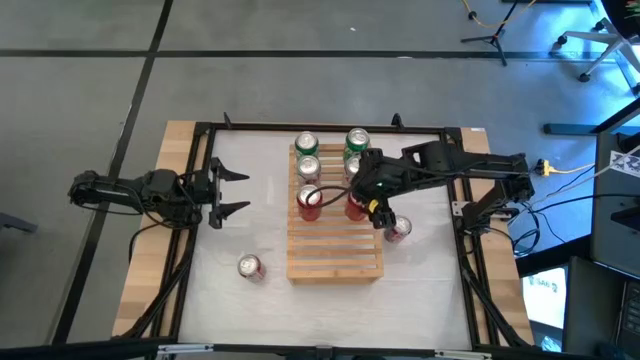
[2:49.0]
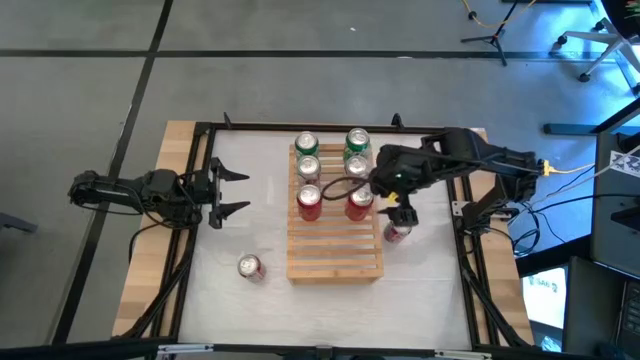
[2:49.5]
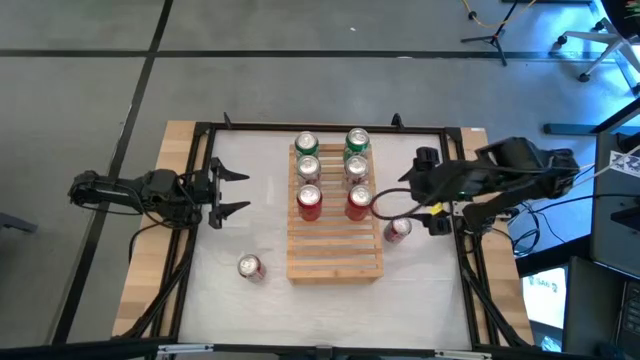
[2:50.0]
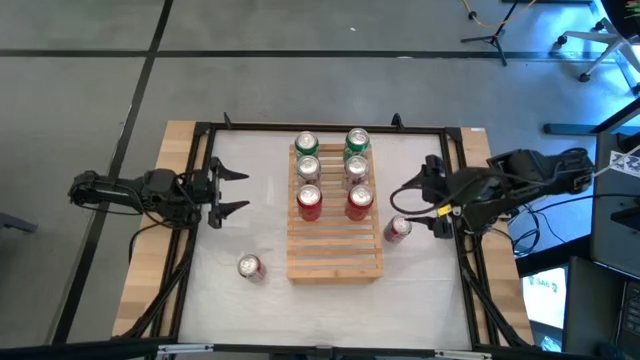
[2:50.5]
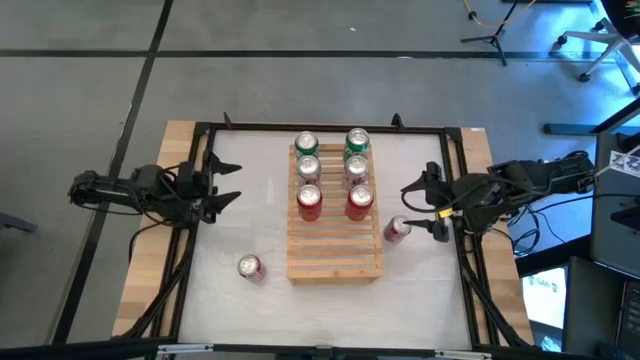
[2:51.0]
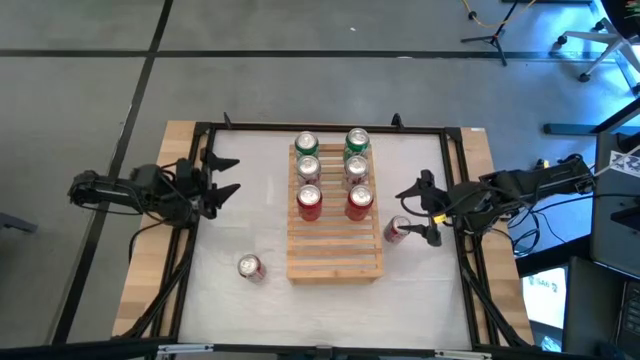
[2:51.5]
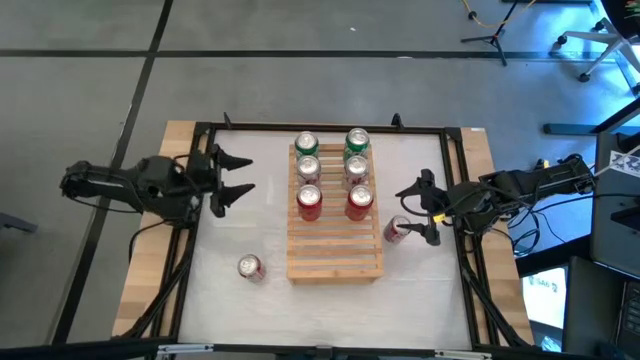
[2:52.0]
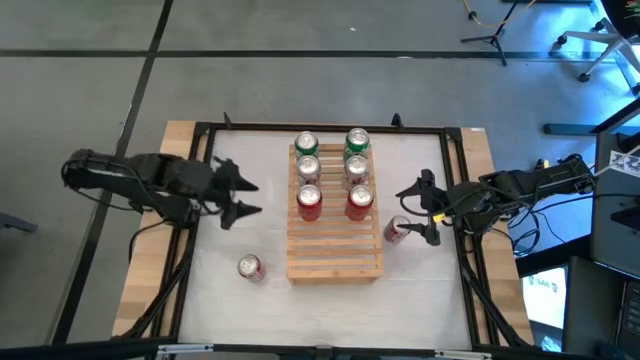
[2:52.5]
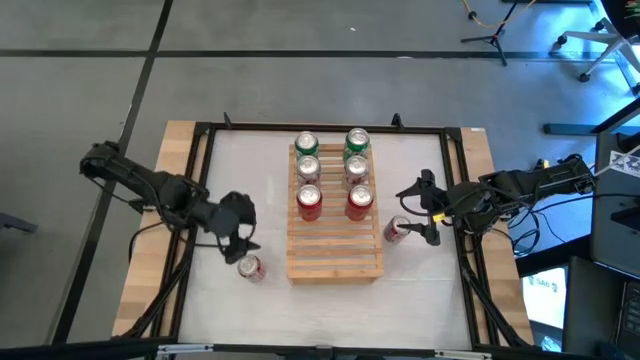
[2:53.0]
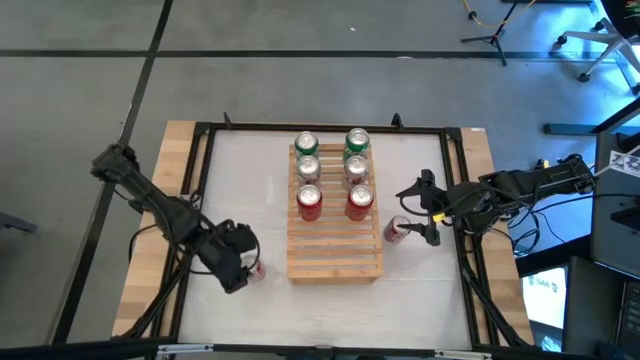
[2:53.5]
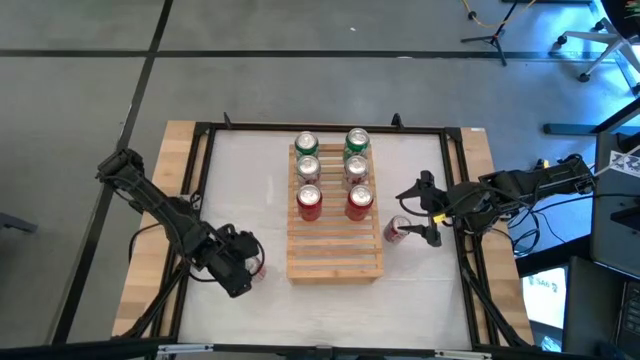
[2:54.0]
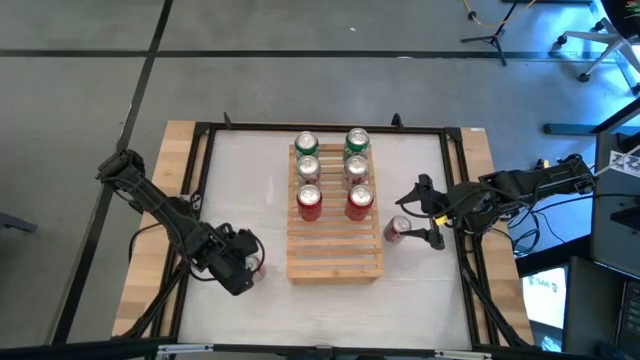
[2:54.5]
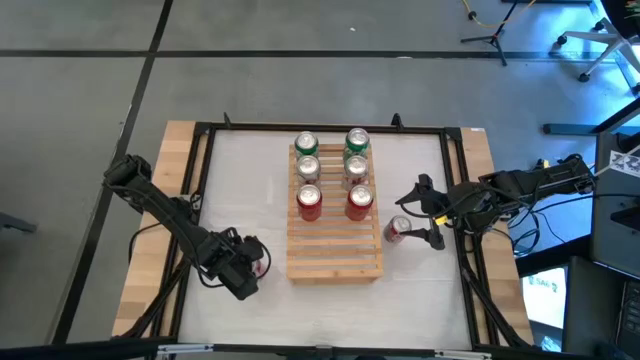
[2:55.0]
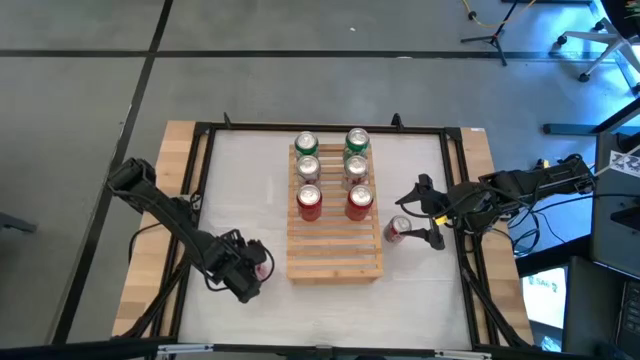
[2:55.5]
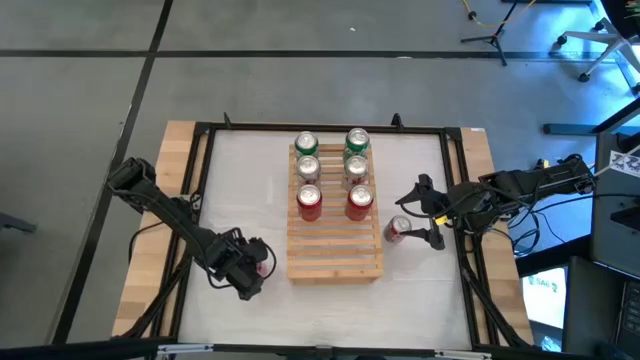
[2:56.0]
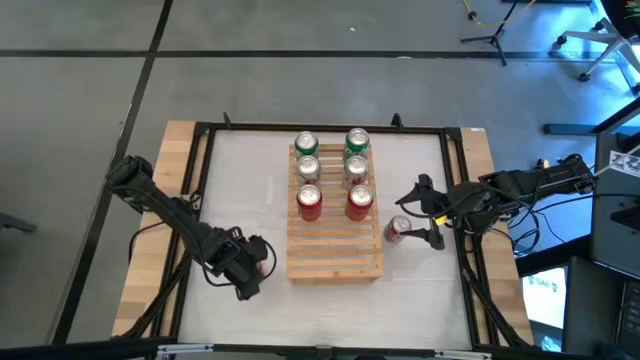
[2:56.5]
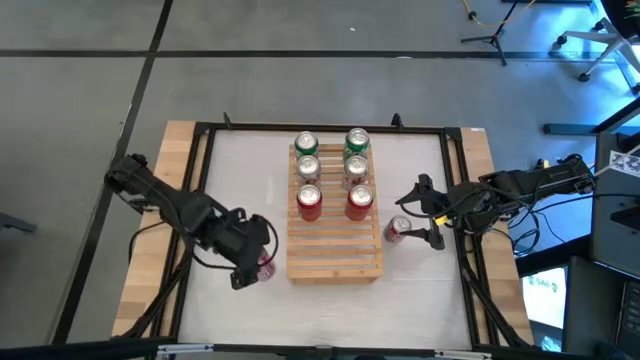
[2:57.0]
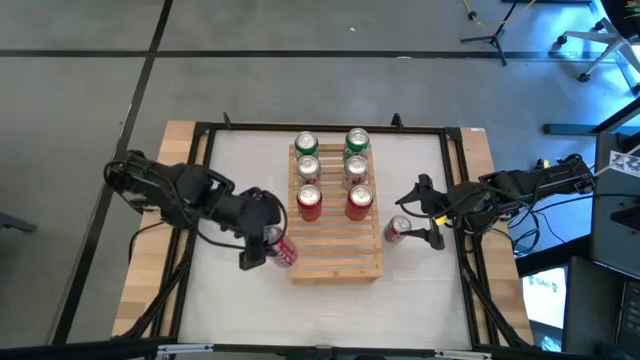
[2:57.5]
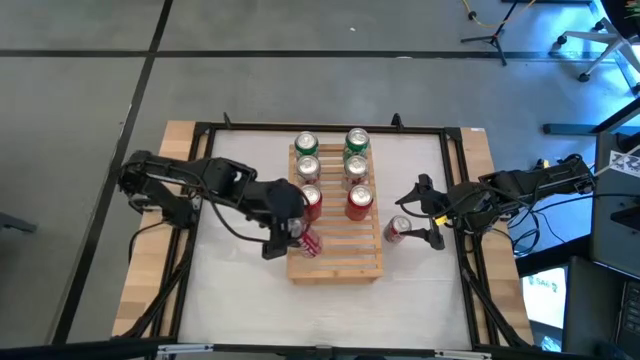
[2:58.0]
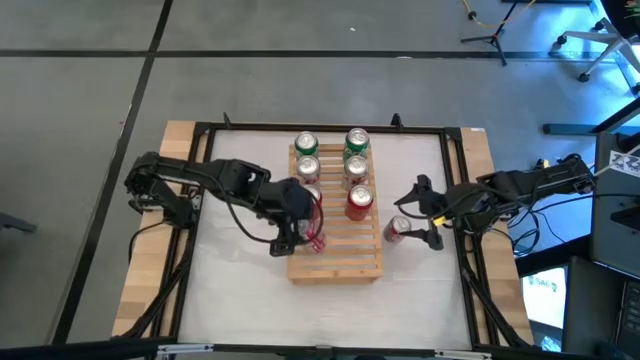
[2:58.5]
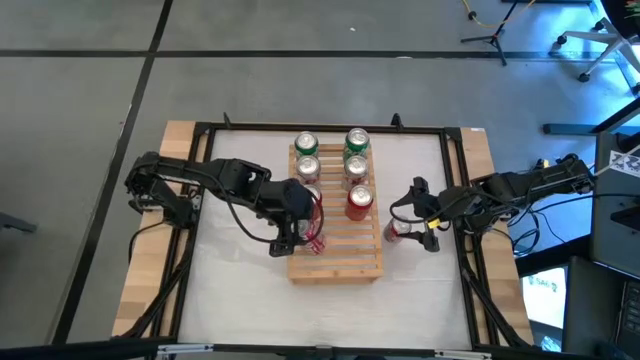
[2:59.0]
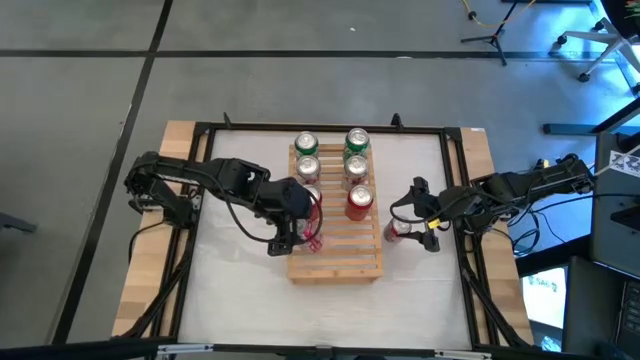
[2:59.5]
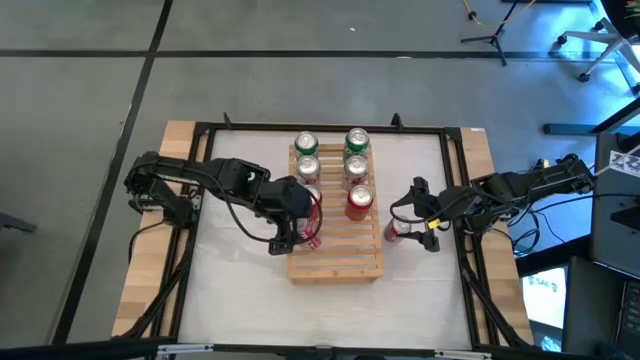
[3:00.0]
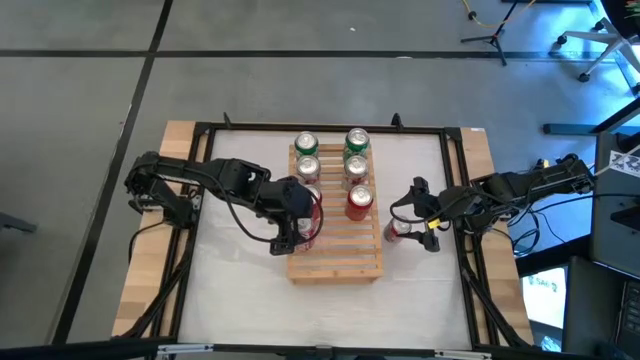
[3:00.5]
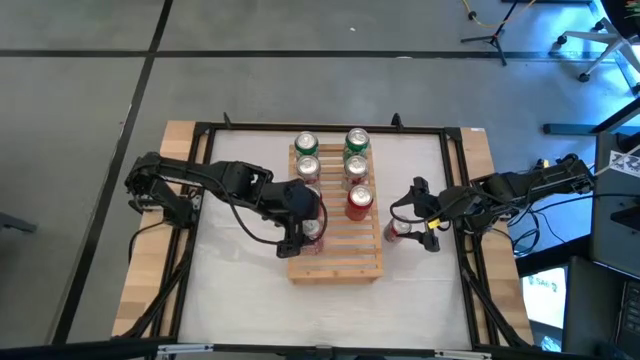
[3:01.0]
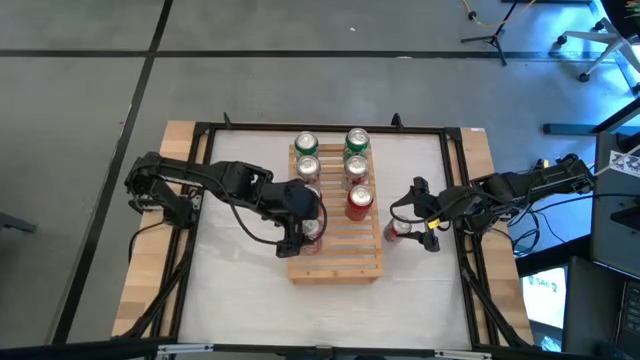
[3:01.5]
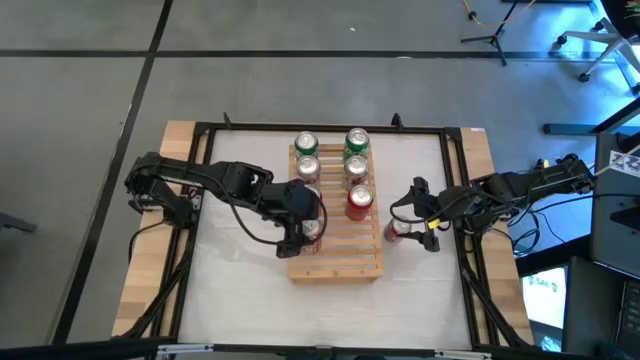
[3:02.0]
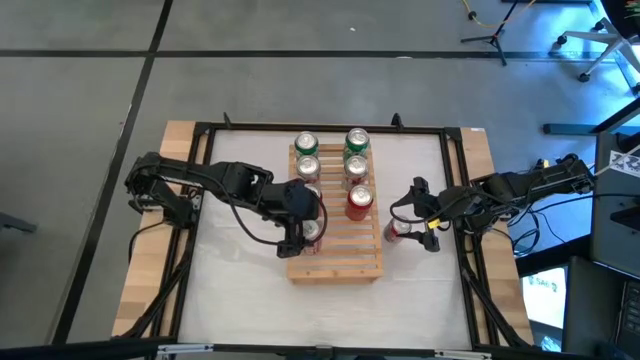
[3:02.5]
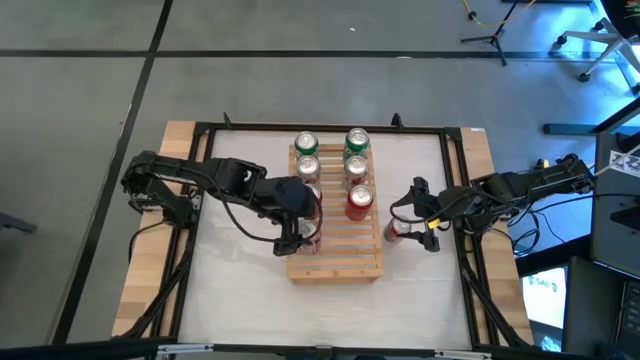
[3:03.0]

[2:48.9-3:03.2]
Task: Place canned beverage on shelf
Put the left white and red soda can on the shelf

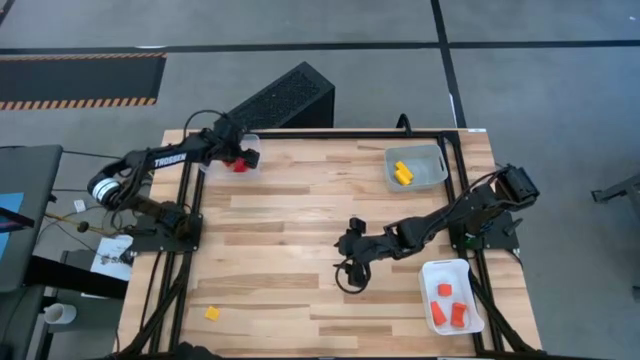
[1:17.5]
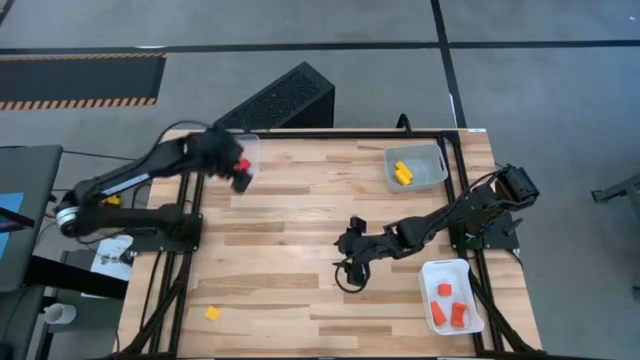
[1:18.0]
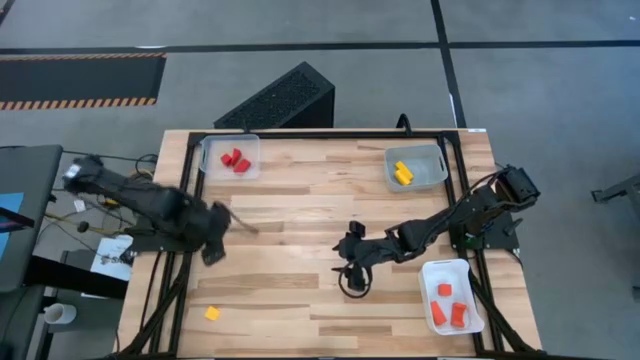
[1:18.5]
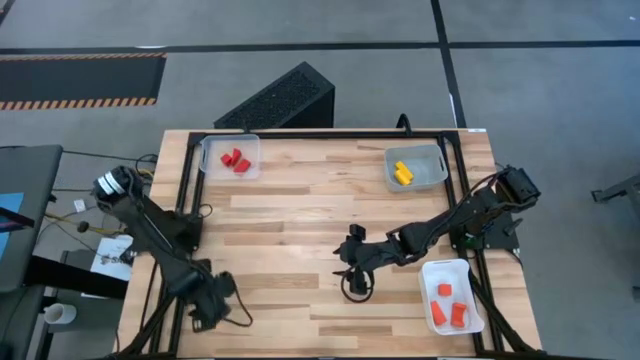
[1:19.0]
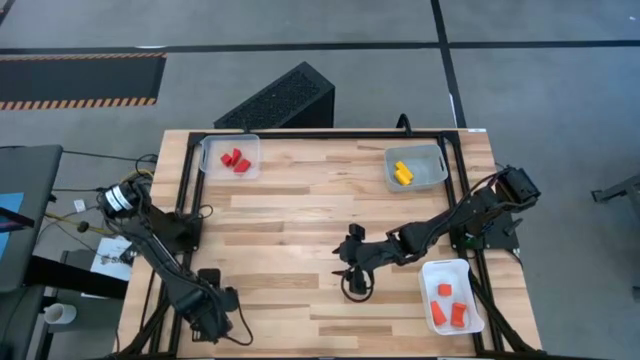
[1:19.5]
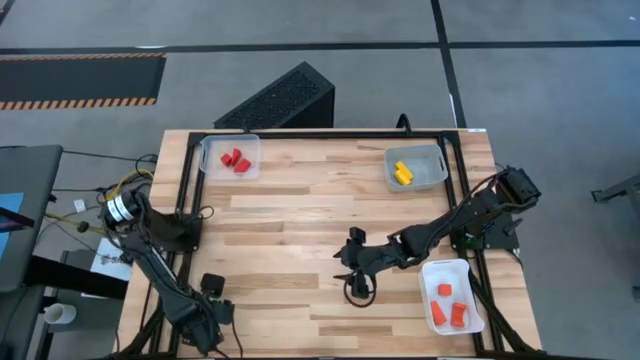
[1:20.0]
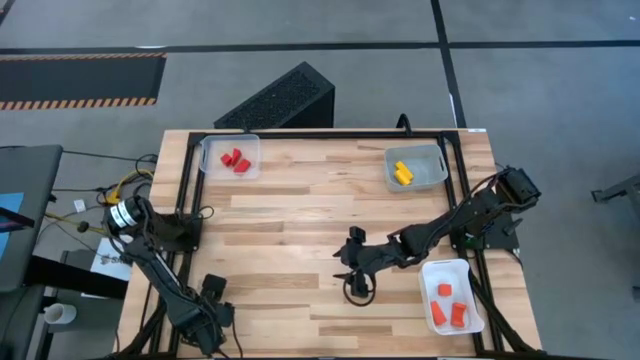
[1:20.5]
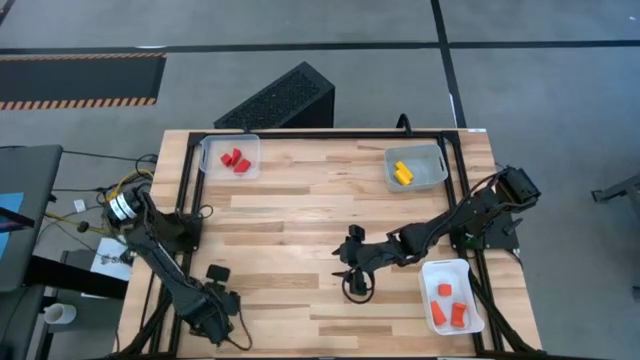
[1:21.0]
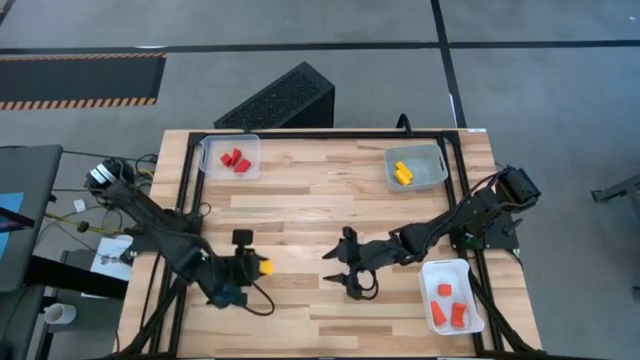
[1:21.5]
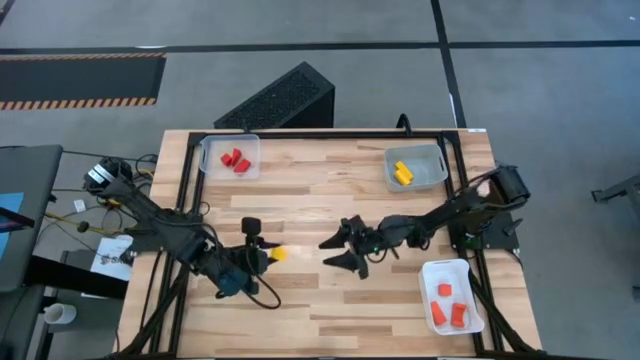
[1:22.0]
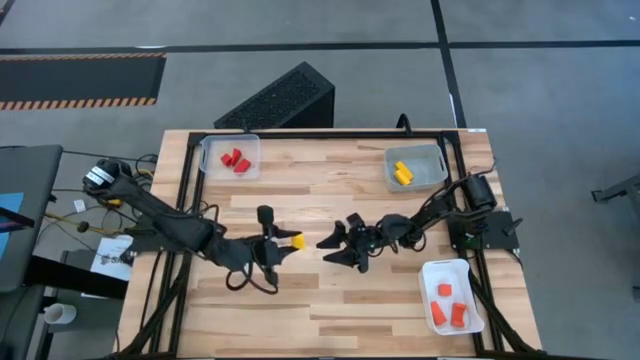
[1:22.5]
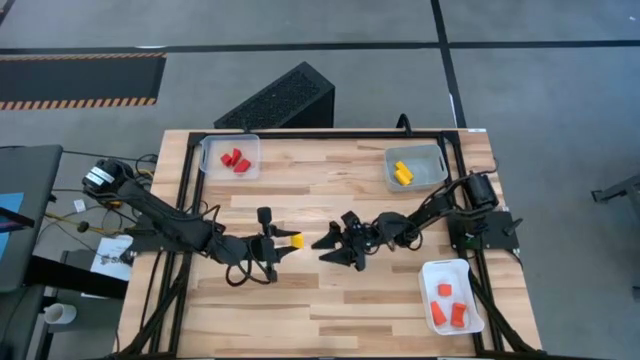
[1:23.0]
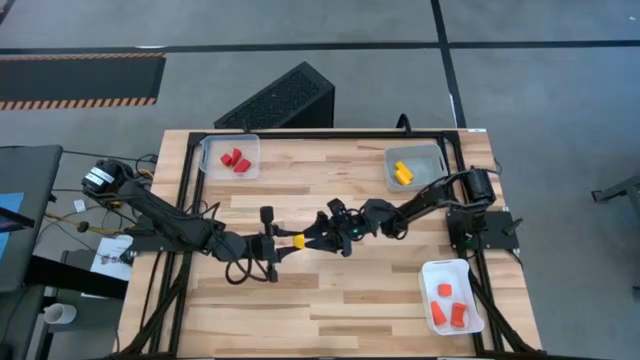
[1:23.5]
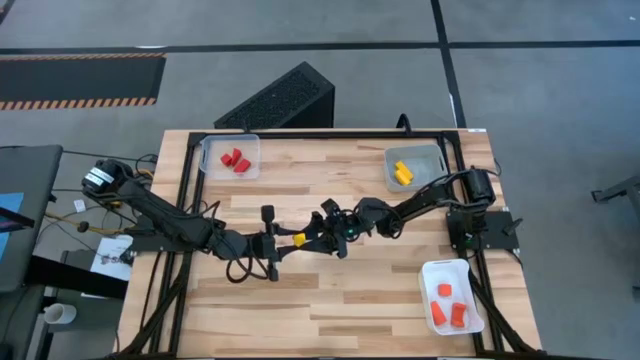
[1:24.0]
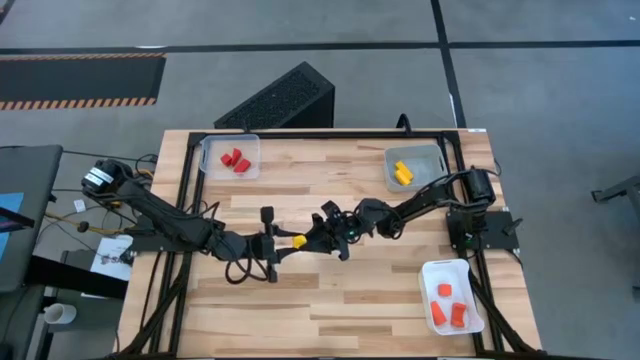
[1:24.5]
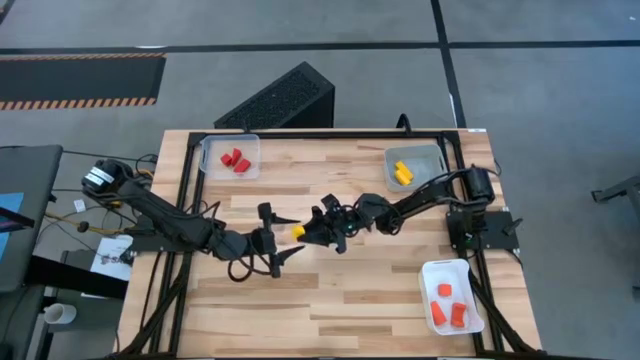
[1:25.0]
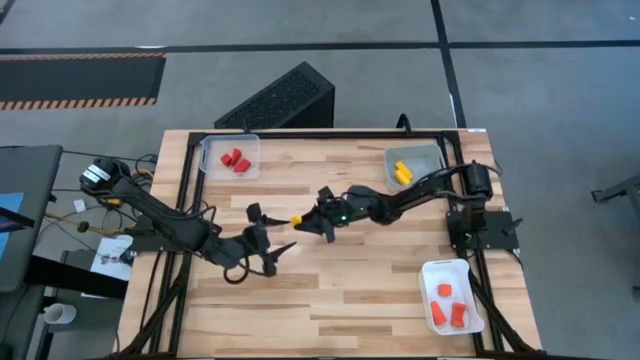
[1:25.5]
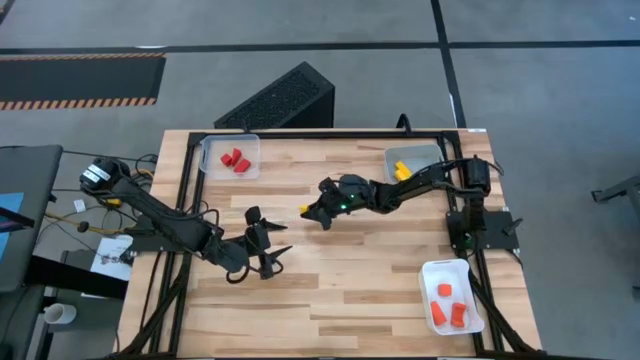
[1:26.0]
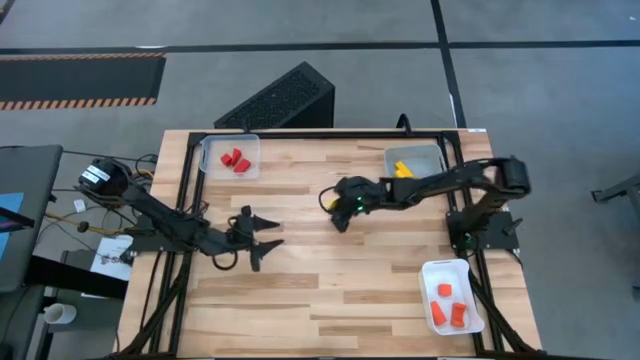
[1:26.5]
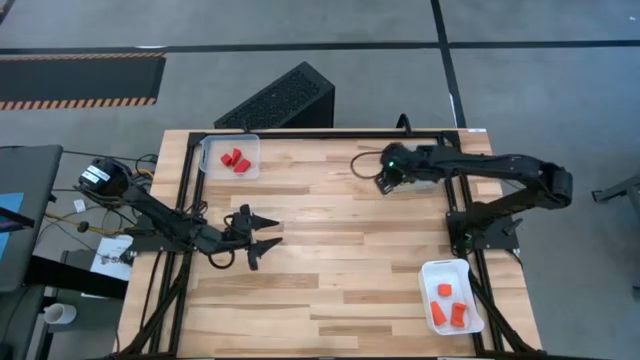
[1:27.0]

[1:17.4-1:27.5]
Task: Sort & place blocks by color
Put the yellow block into the gray bin
